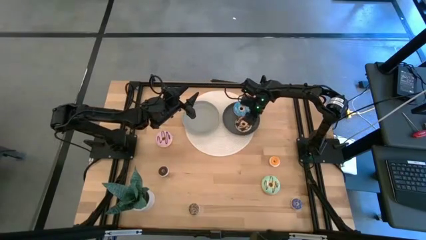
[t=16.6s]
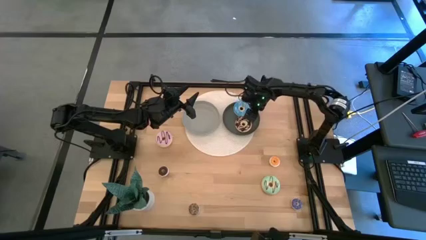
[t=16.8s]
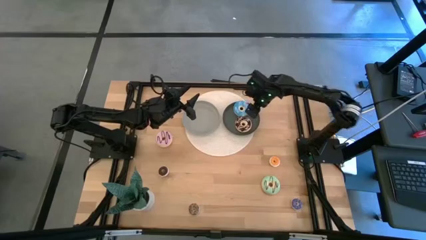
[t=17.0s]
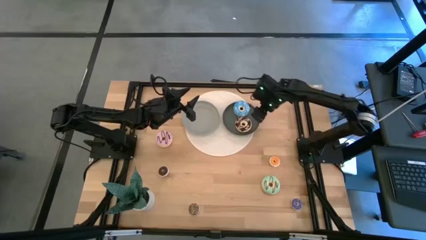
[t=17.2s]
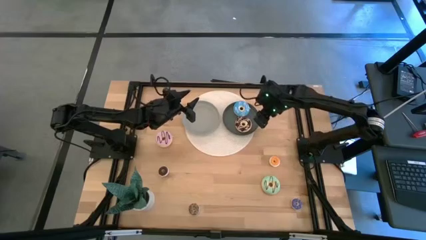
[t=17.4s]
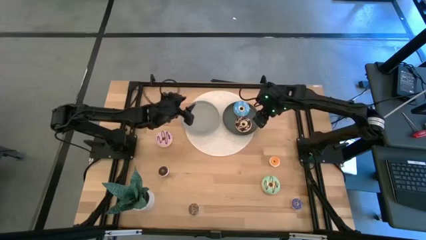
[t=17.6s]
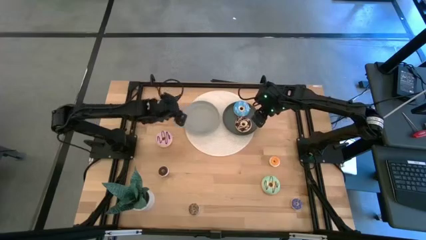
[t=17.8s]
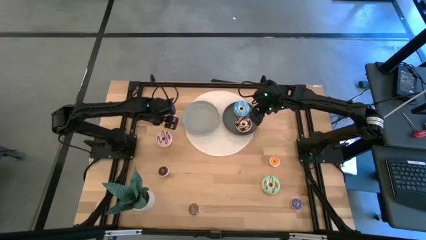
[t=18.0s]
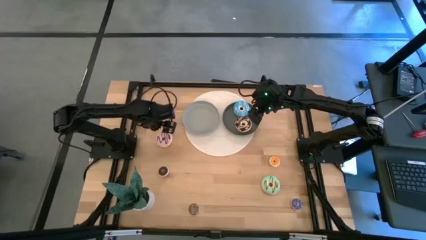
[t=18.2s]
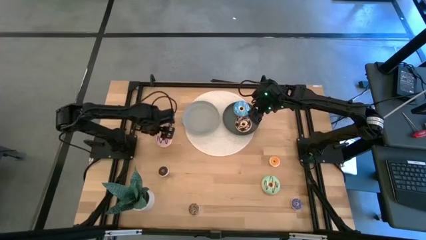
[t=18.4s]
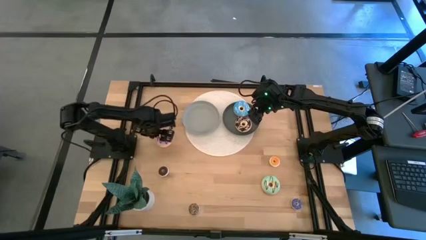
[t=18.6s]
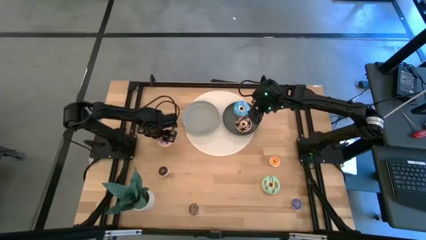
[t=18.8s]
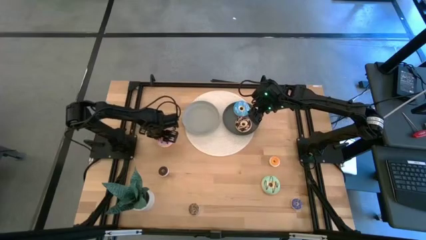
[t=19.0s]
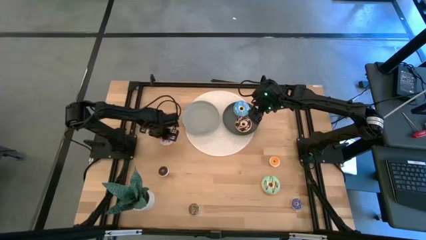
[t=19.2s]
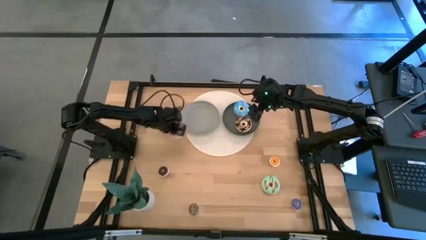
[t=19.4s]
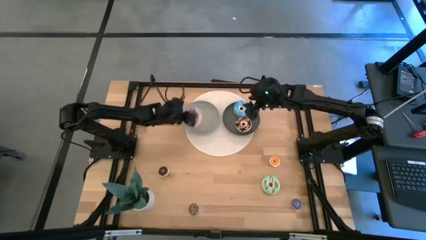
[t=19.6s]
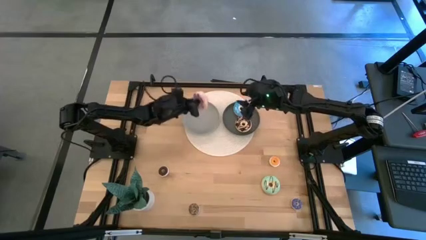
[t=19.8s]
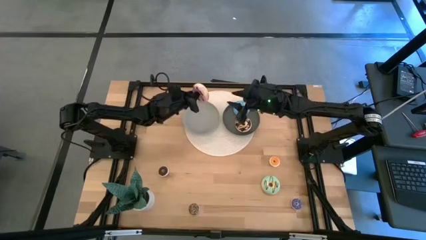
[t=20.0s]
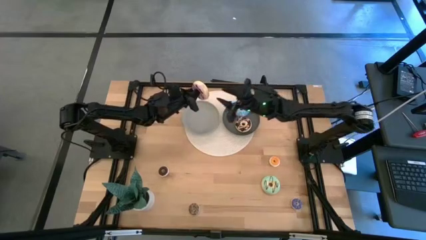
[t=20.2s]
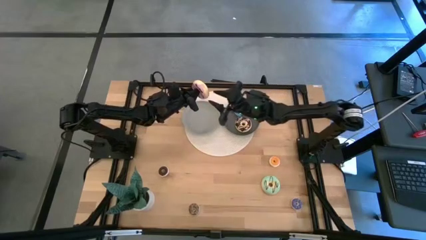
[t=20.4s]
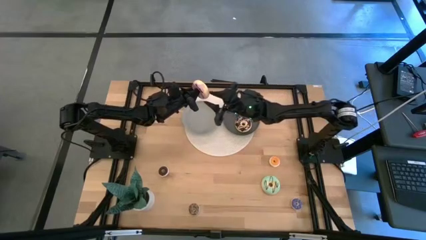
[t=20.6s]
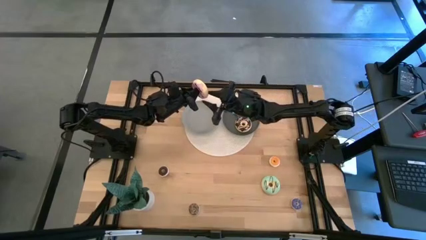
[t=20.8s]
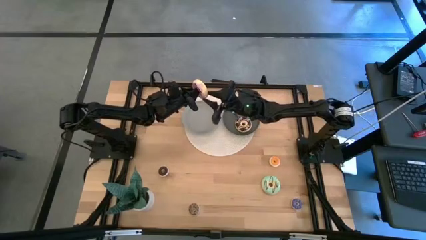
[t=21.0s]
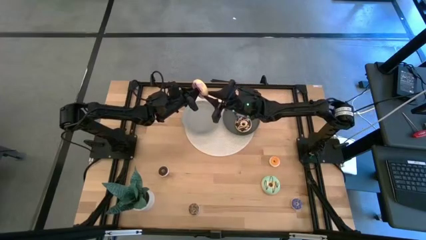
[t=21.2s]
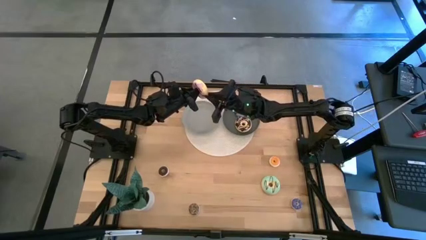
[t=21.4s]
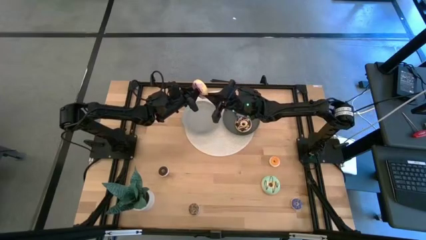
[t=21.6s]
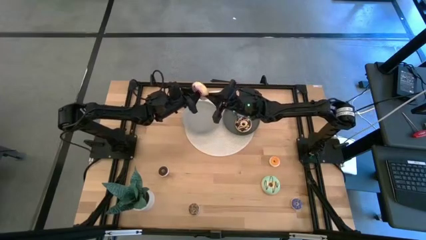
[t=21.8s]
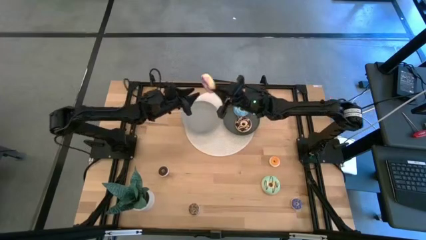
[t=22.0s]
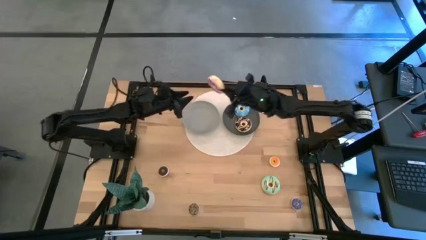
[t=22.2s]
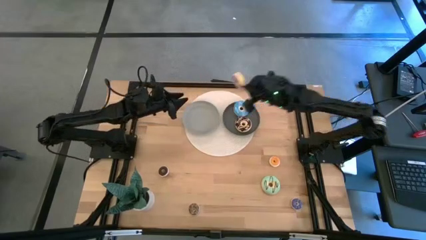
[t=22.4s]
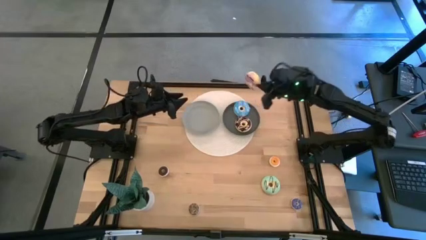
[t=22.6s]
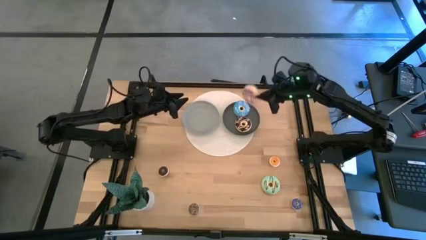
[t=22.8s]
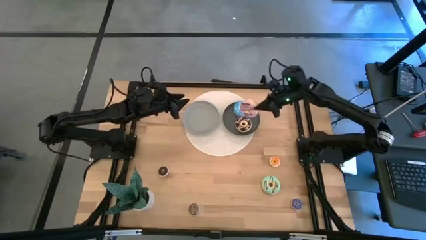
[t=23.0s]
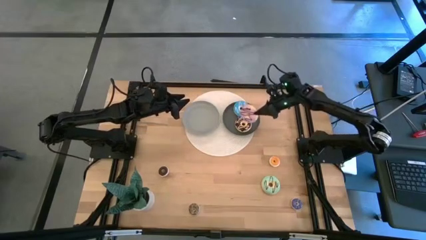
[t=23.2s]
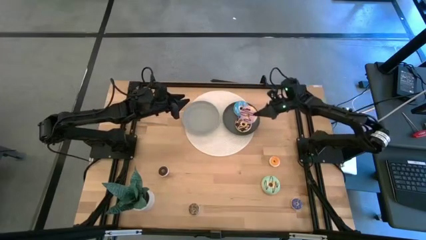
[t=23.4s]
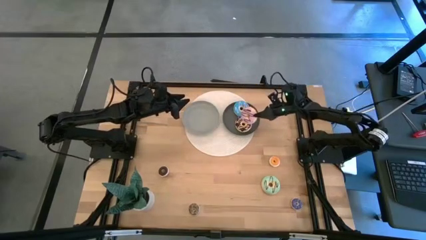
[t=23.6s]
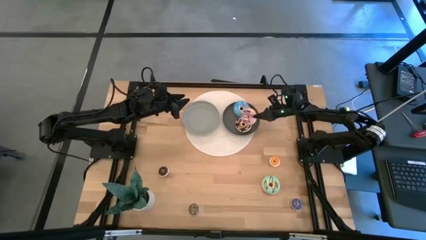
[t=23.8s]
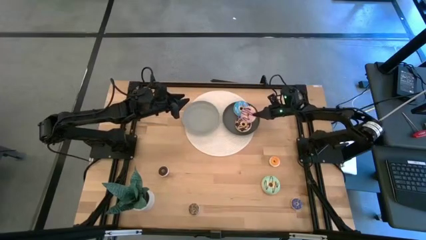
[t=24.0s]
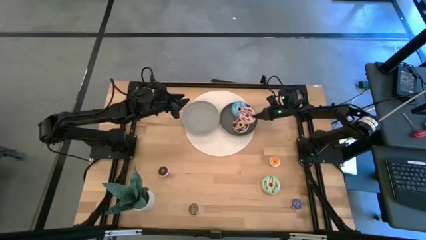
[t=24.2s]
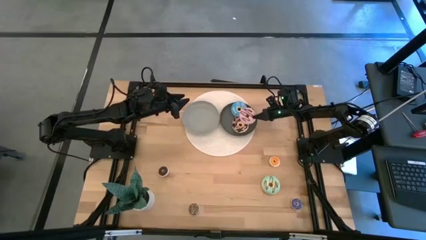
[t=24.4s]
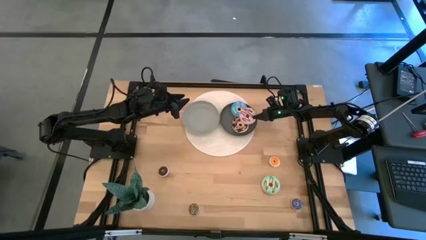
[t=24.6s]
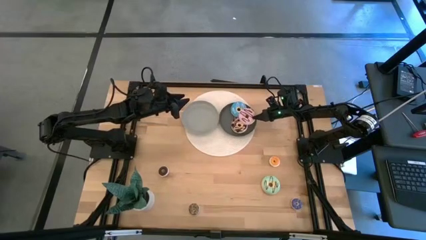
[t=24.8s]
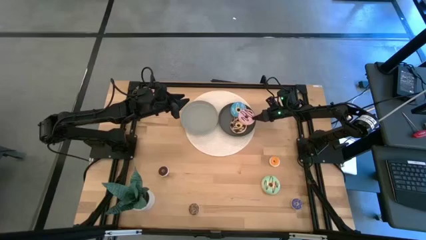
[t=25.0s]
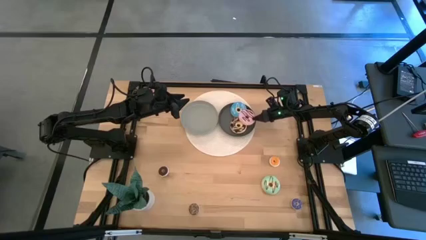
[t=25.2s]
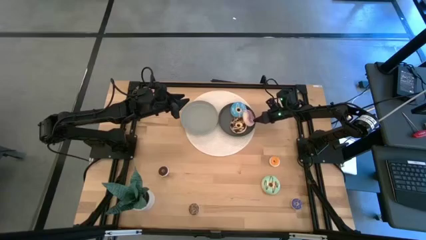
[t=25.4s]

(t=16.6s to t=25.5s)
Task: Pick & Place donuts
Put the large purple donut on the black plate

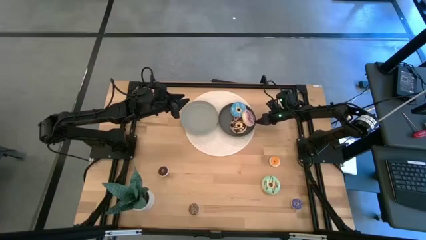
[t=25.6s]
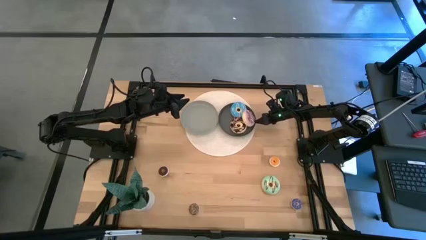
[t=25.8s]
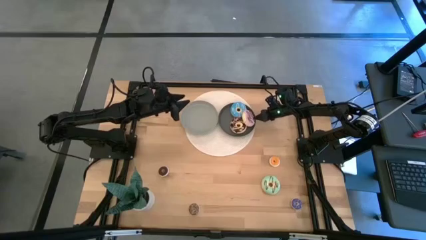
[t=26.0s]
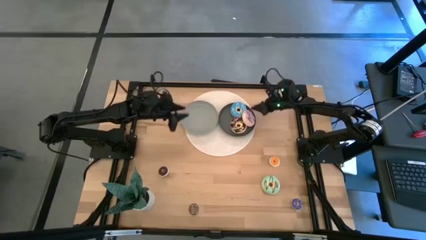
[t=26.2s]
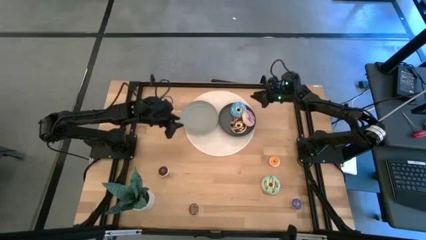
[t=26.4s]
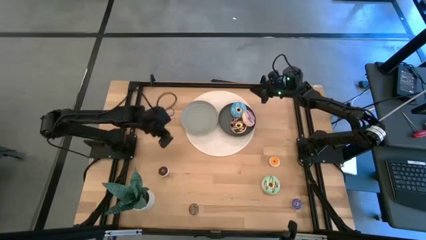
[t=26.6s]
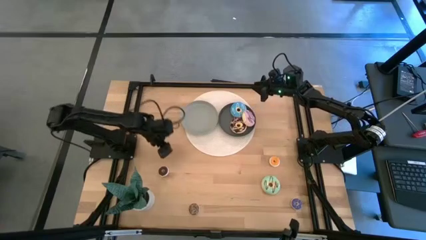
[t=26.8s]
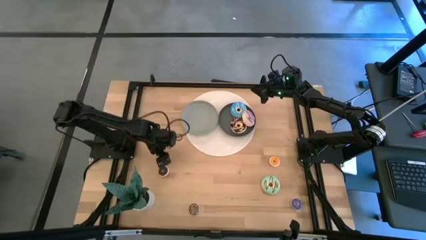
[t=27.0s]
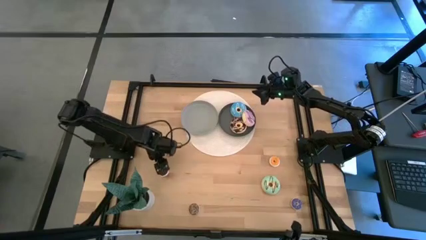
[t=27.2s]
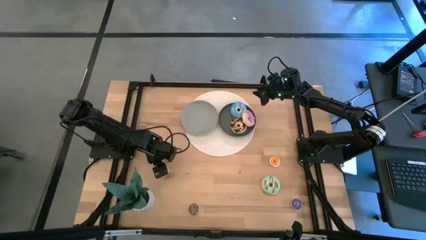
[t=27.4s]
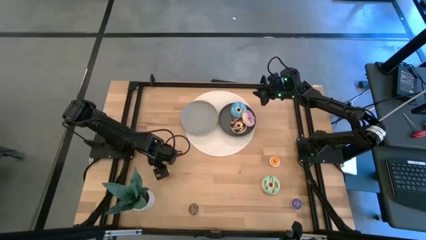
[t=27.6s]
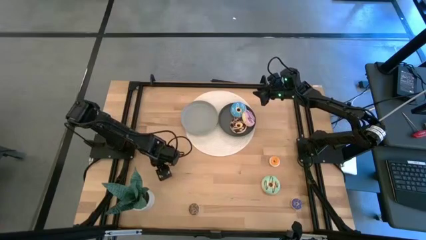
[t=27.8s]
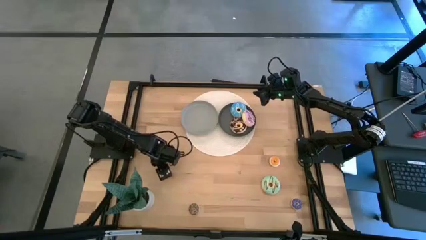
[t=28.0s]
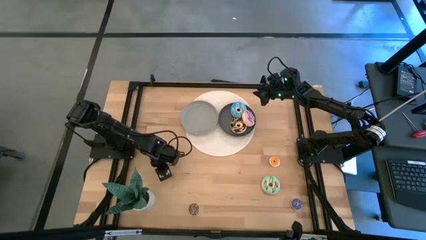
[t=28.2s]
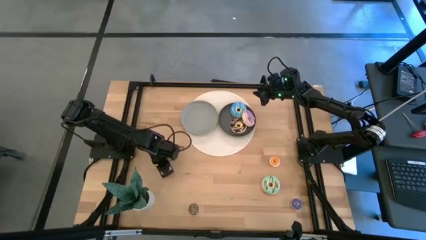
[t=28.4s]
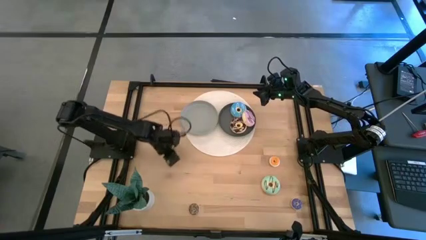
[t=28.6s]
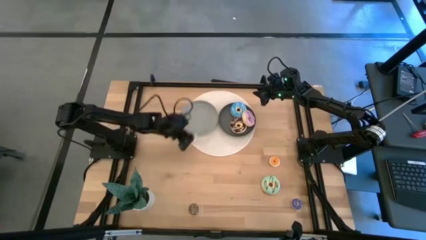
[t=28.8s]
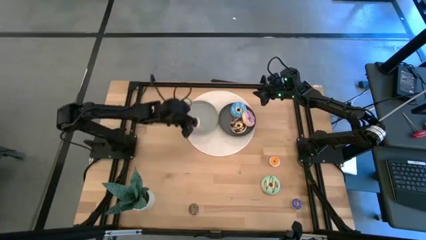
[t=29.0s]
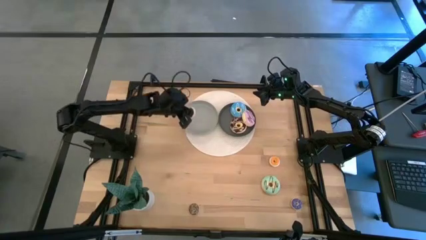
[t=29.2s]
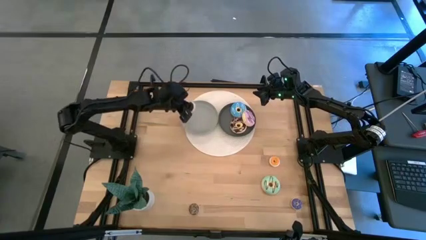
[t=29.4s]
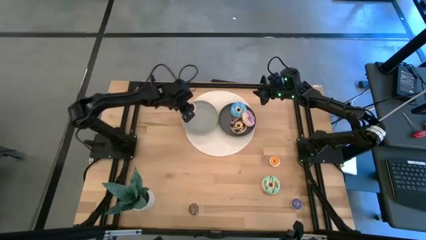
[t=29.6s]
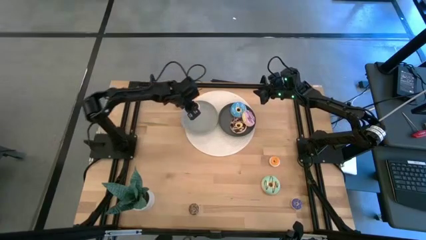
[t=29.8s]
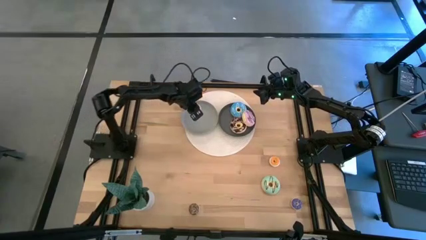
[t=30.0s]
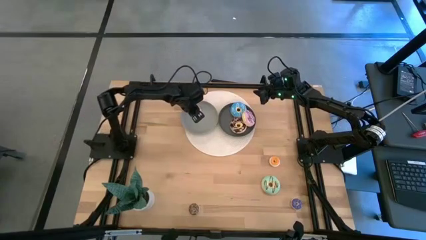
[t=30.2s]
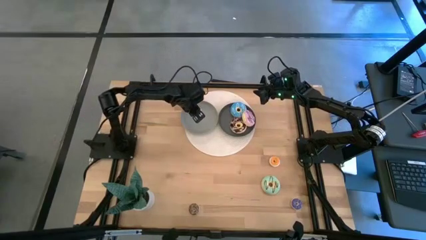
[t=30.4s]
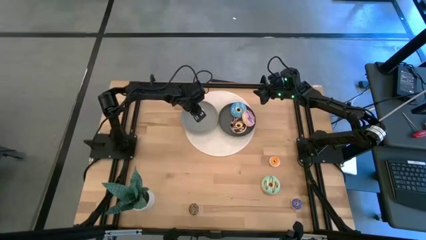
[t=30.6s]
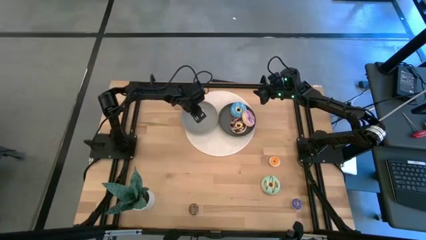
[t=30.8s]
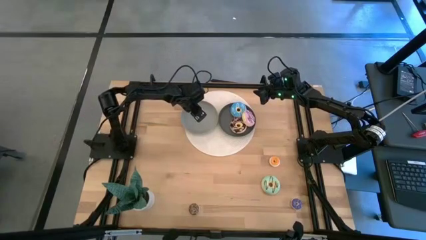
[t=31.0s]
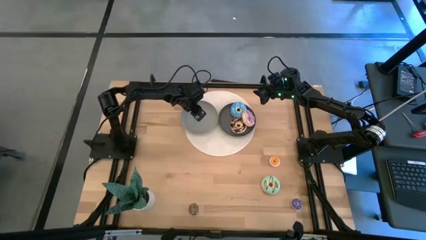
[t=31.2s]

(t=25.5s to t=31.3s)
Put the small black donut on the gray plate

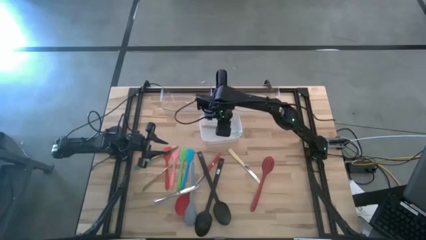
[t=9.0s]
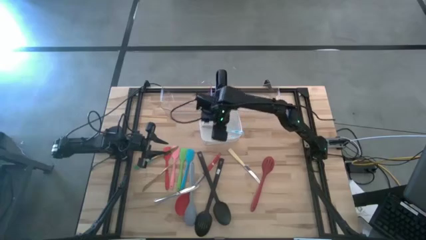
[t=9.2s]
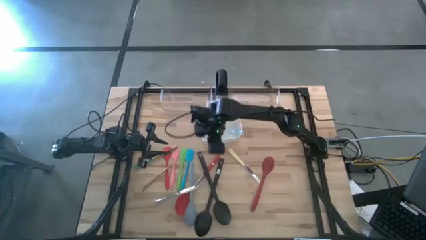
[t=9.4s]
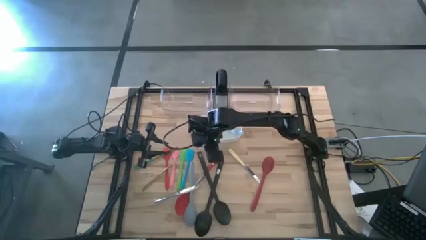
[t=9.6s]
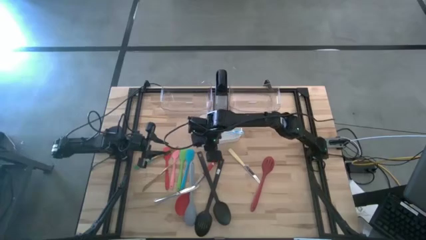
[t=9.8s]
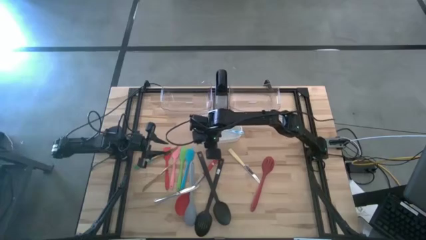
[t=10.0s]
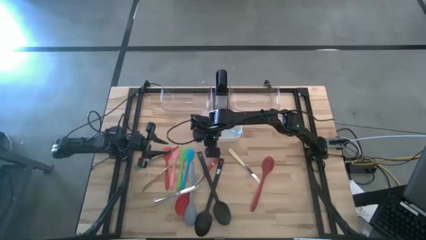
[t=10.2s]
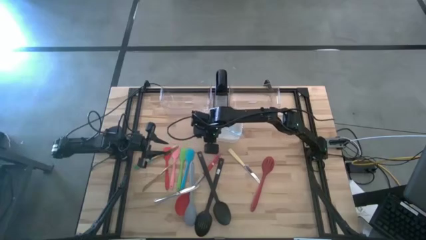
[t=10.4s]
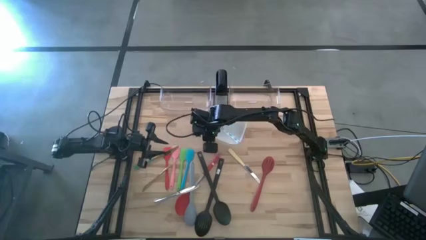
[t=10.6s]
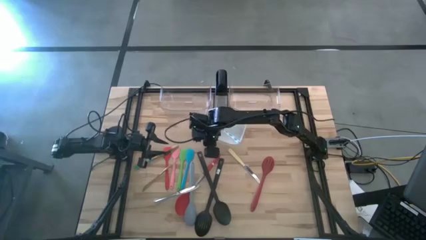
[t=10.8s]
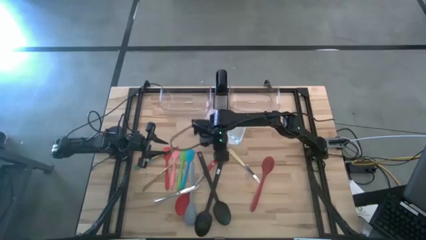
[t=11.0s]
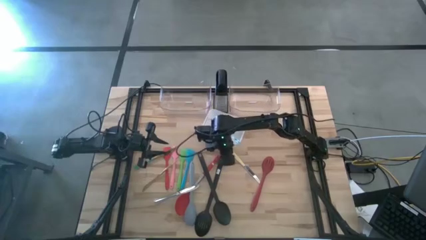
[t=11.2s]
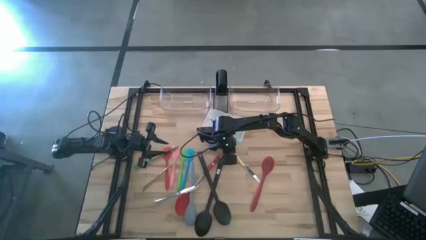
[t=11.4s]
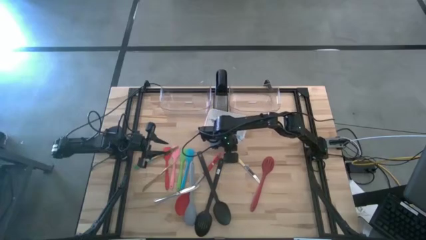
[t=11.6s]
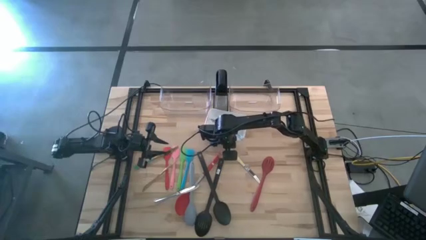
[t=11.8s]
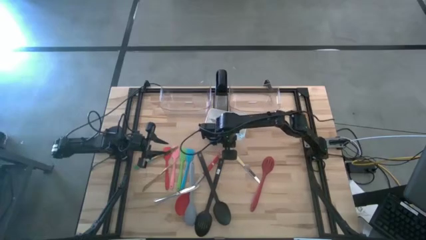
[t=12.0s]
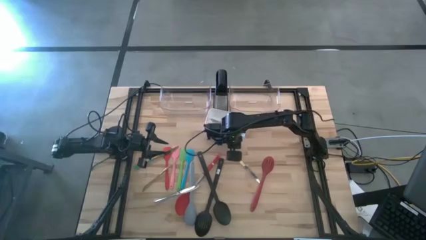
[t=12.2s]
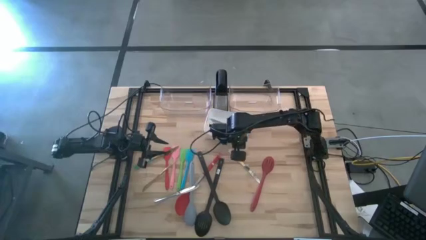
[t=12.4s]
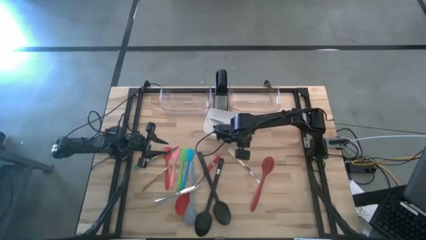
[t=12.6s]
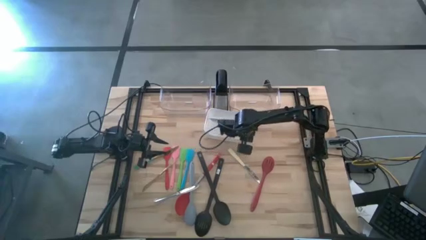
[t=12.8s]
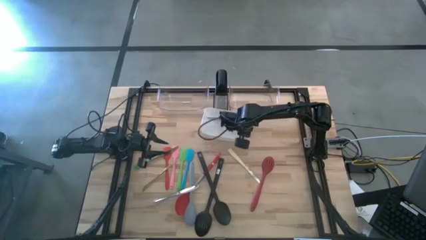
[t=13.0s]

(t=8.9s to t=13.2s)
Task: Pick & Place Kitchen Items
Adjust the white bin
